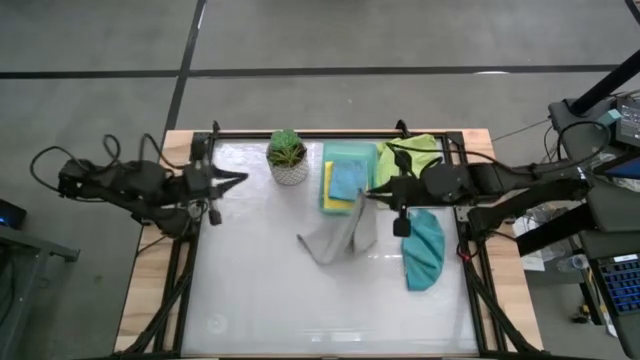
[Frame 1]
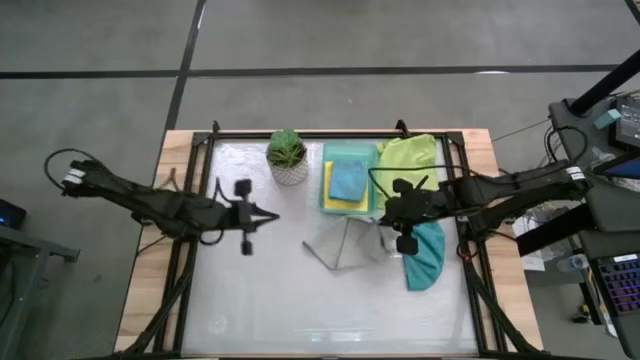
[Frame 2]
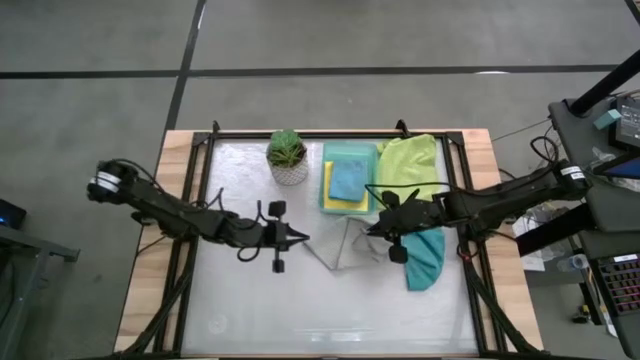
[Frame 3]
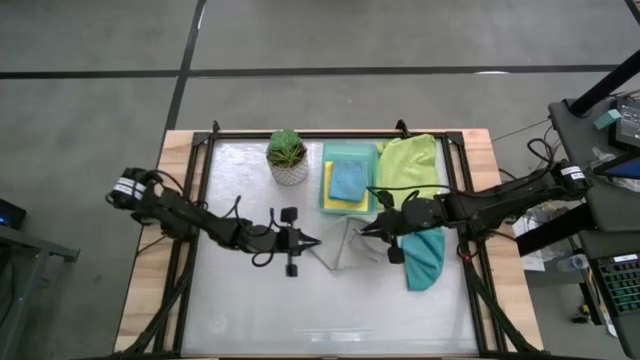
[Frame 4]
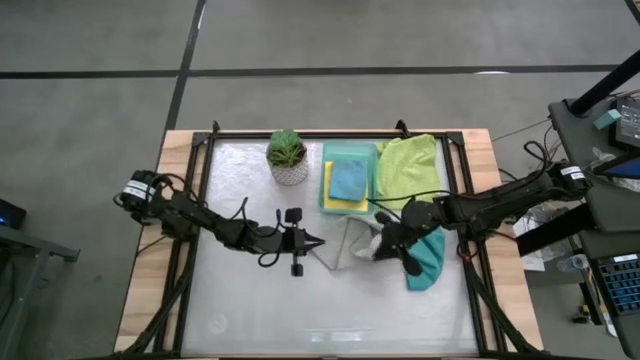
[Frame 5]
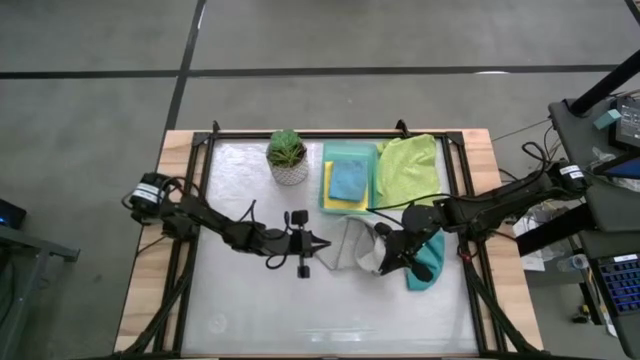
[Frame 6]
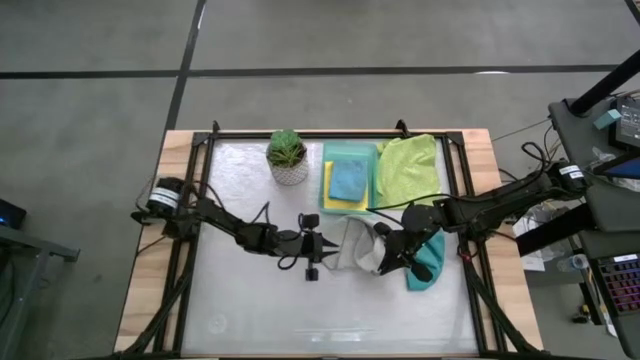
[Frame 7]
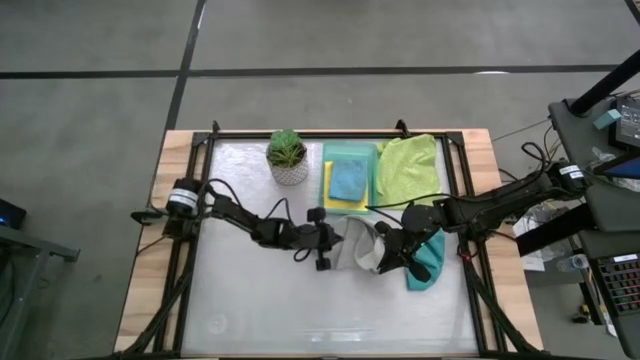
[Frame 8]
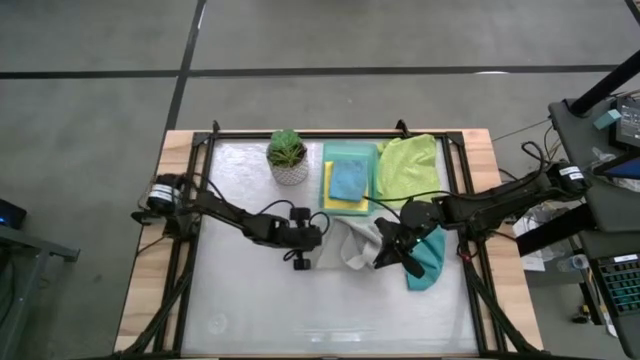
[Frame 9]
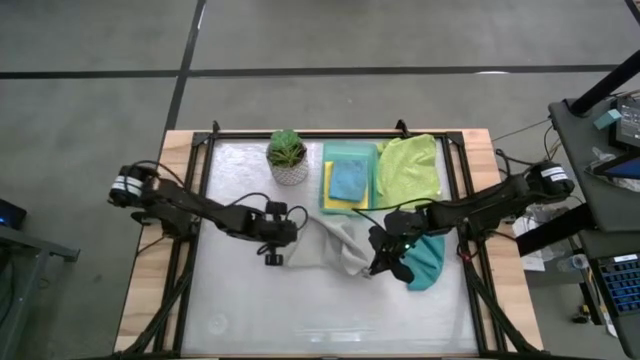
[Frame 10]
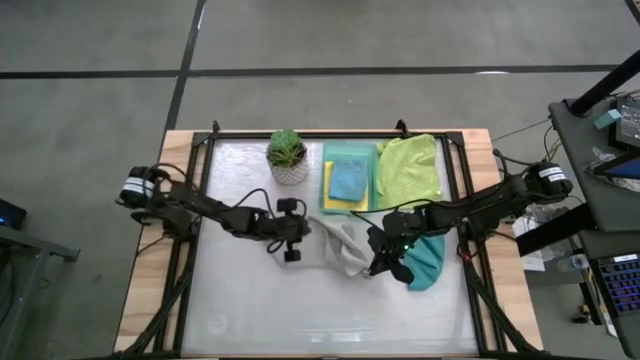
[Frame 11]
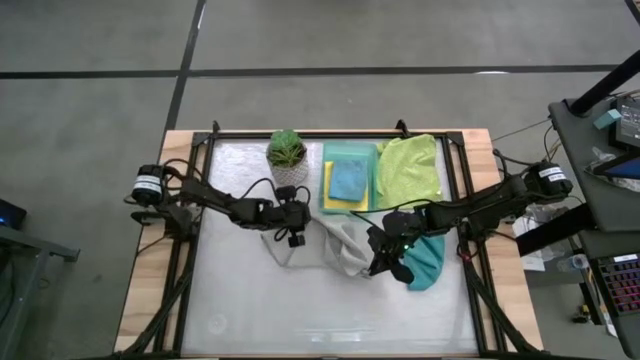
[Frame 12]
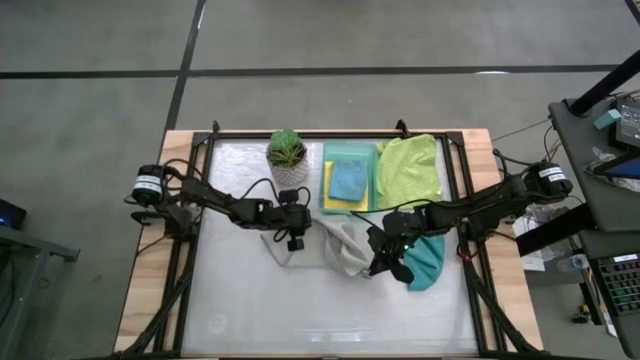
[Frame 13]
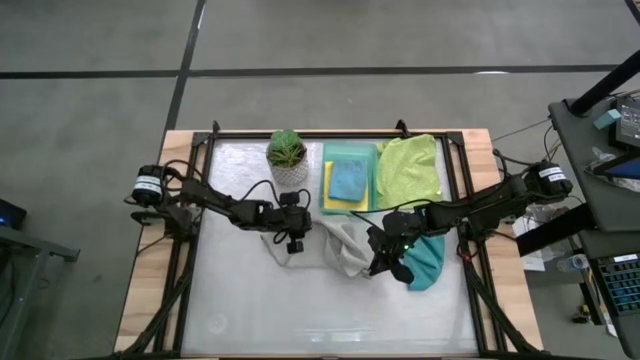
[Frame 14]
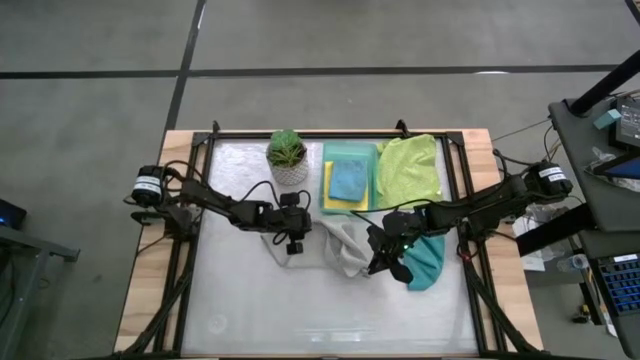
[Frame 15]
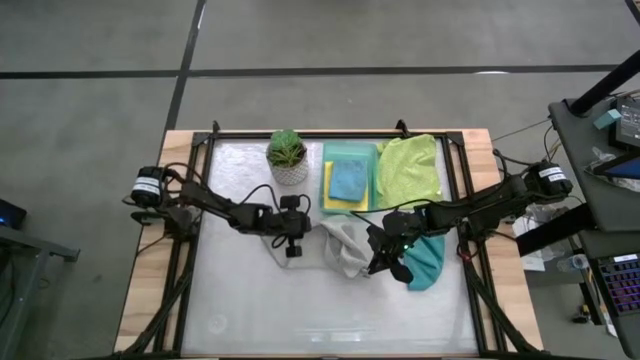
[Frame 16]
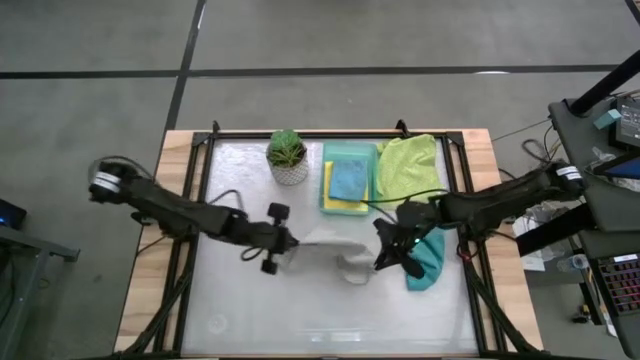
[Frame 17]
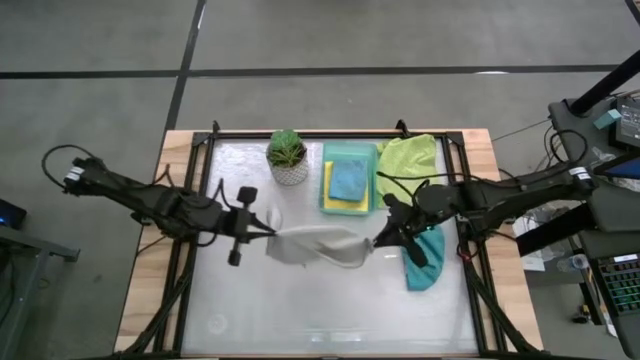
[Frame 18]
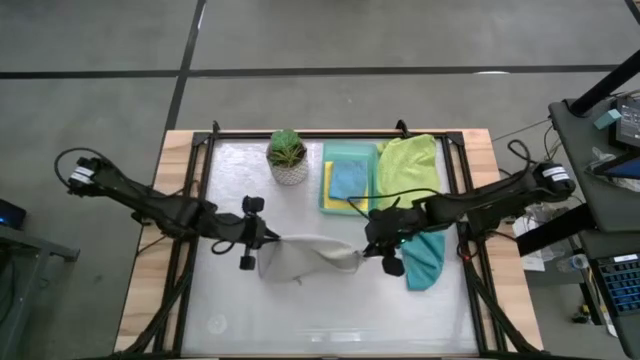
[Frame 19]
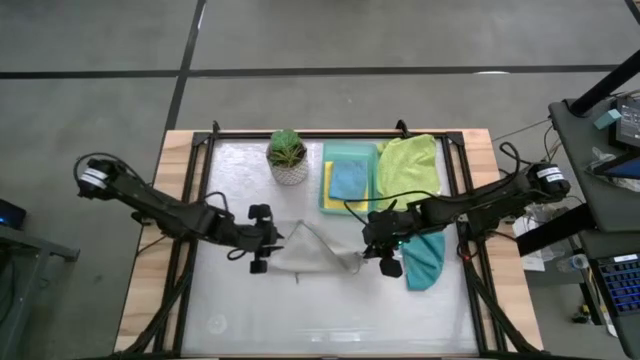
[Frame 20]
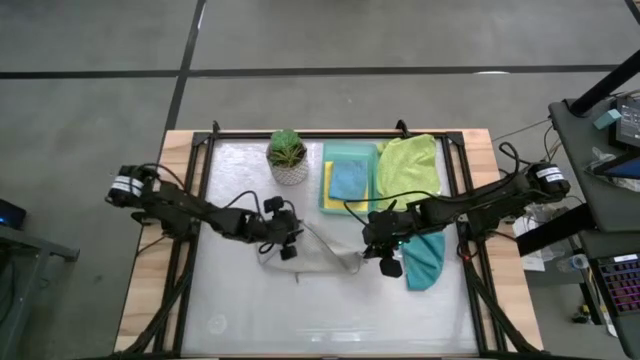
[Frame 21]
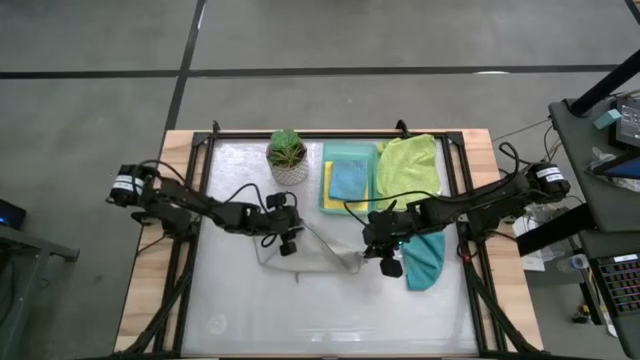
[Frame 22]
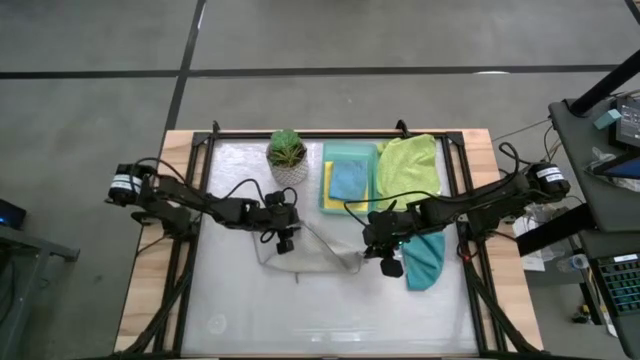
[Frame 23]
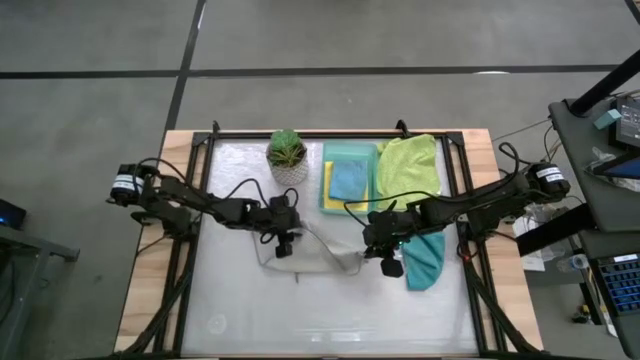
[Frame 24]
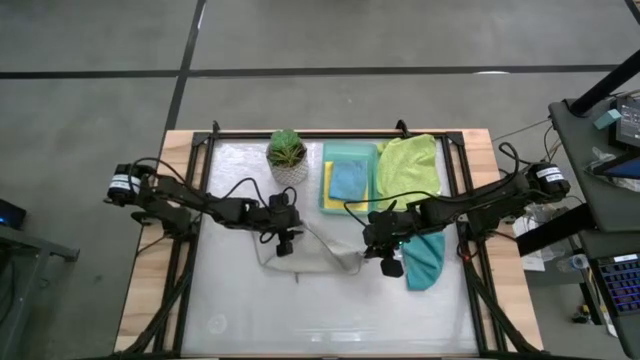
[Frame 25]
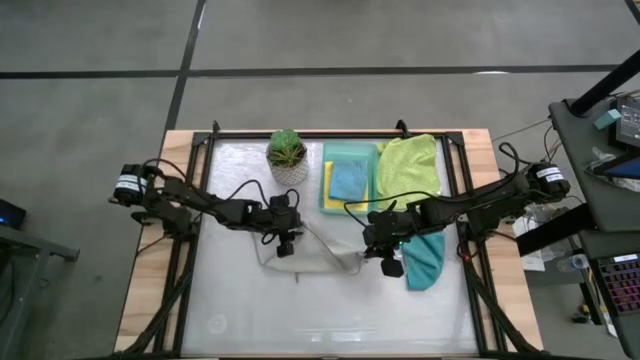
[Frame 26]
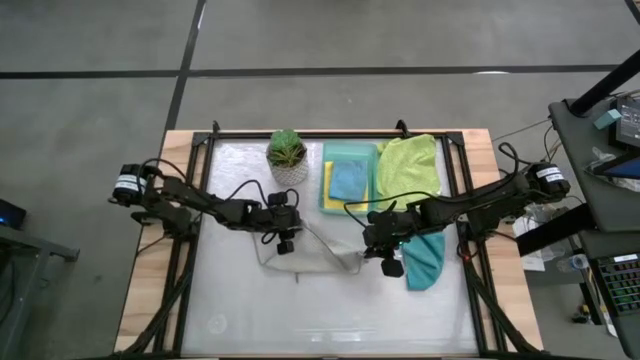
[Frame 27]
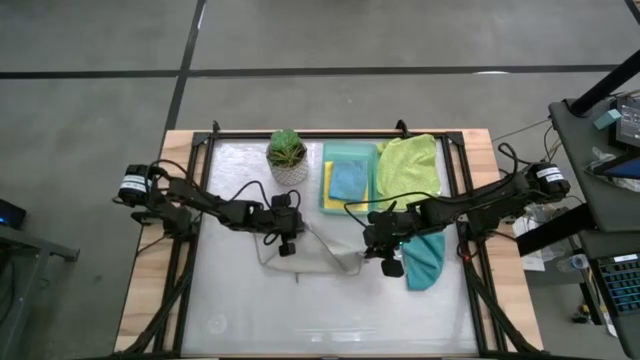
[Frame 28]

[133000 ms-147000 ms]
Task: Fold microfiber towels
Fold the gray microfiber cloth

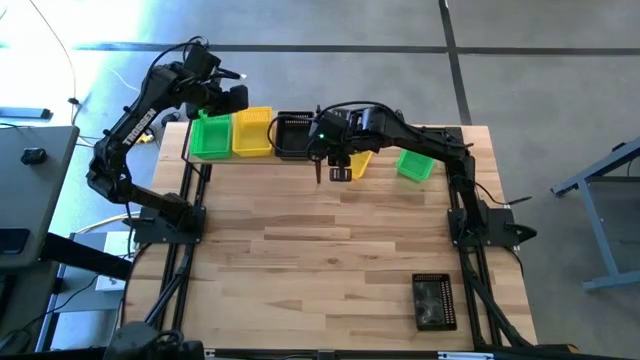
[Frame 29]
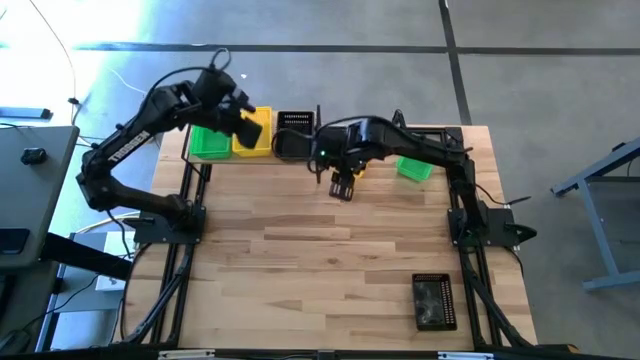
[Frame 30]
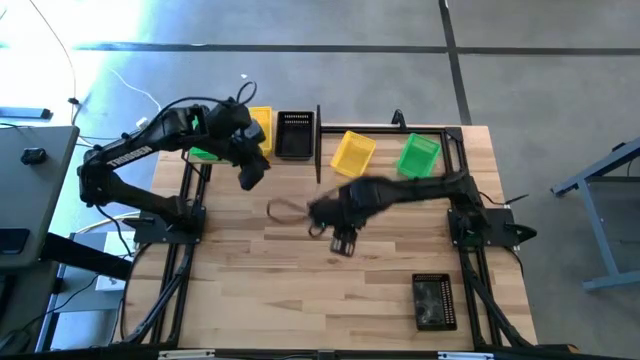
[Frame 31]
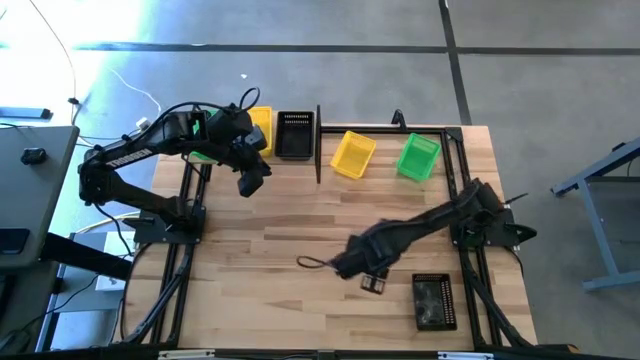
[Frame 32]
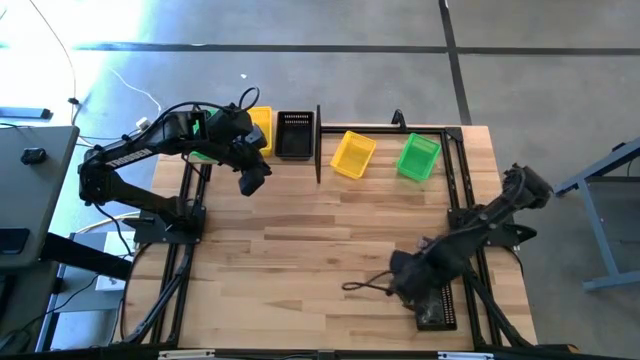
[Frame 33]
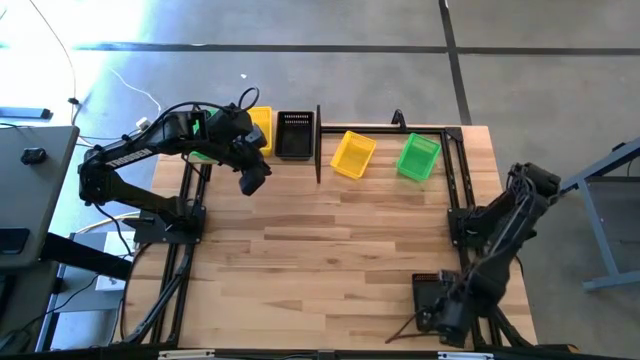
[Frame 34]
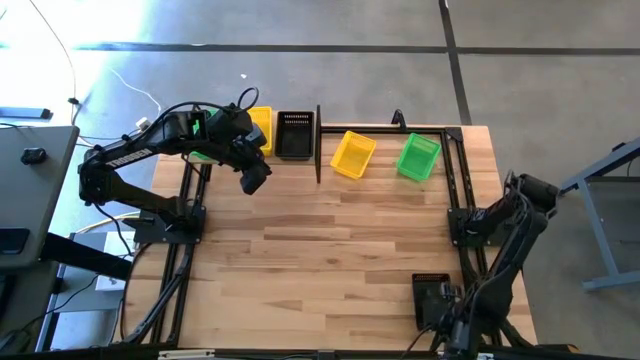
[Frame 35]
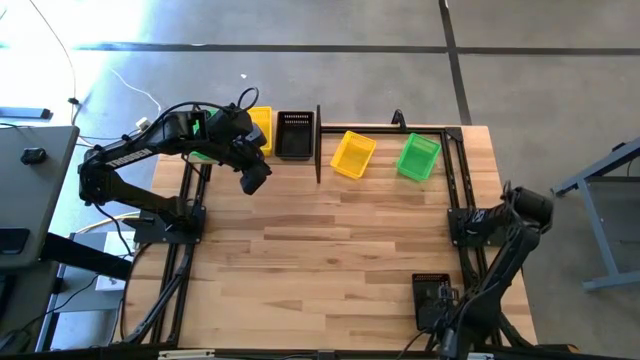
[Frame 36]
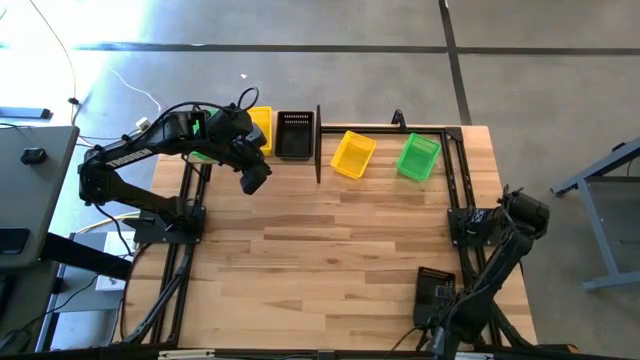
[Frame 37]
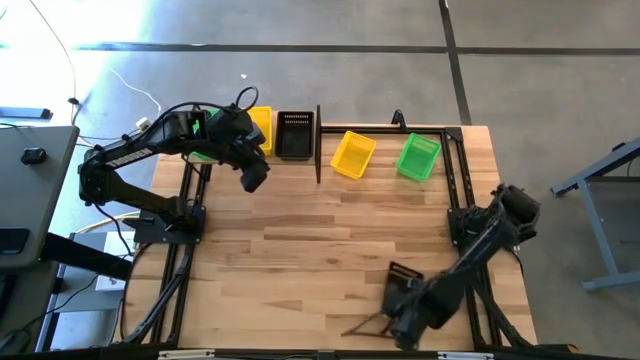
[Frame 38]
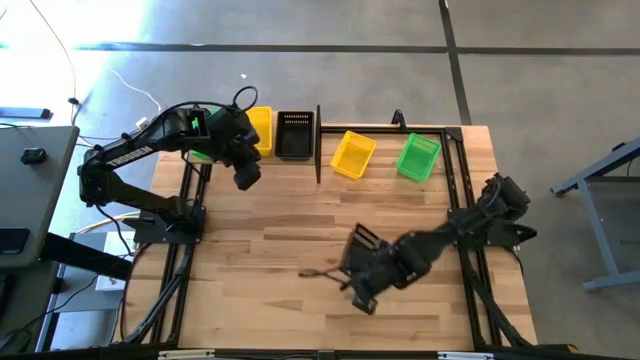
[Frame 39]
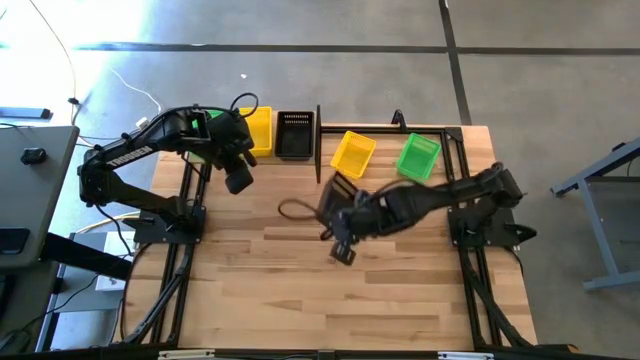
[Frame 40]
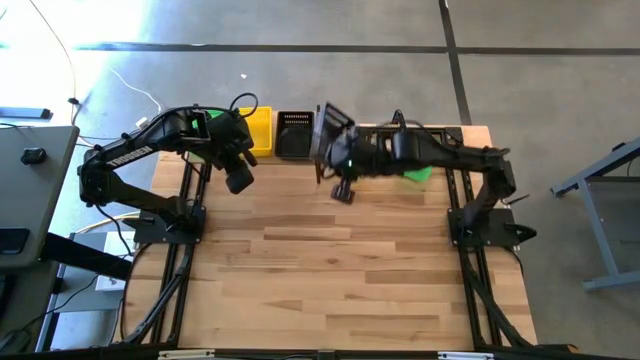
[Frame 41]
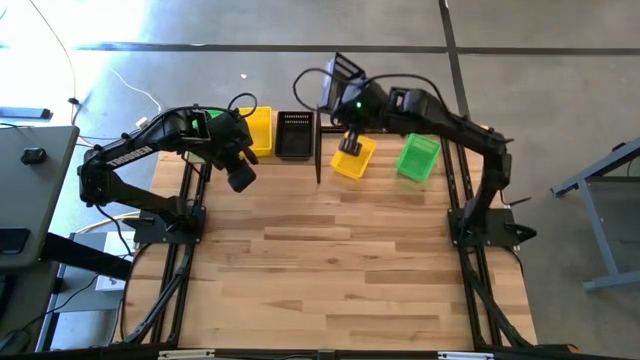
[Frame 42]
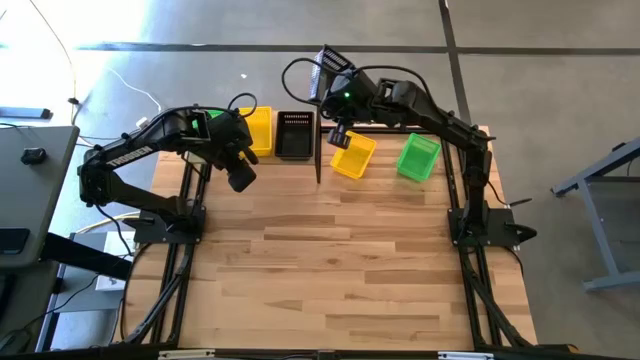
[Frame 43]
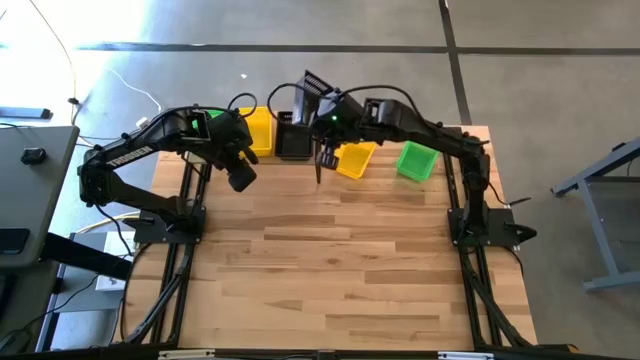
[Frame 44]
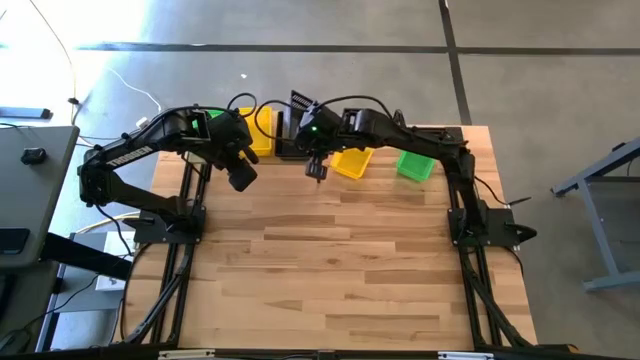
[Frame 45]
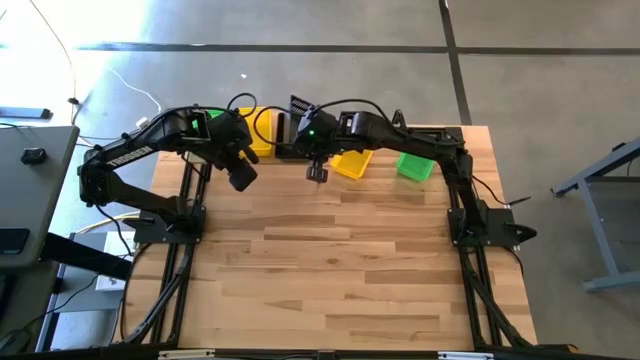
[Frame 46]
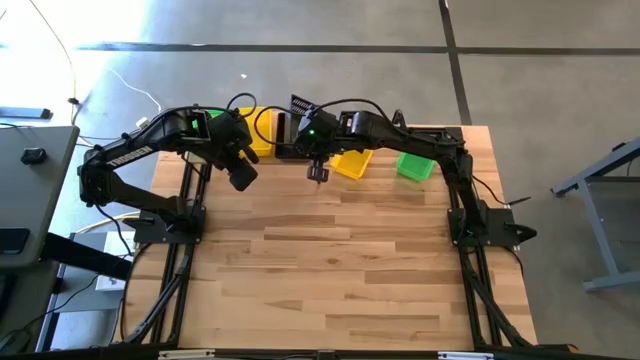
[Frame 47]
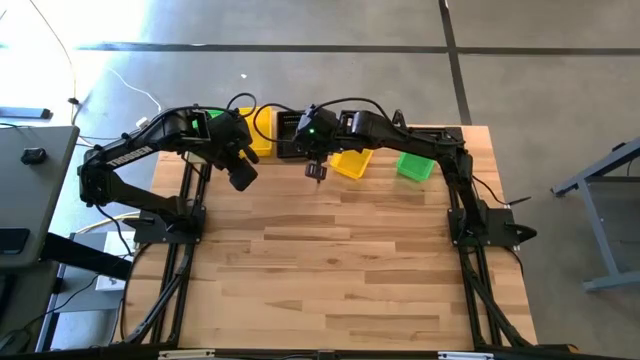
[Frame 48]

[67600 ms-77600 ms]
Task: Stack baskets on shelf by color
Stack the black bin on top of the black bin on the shelf
